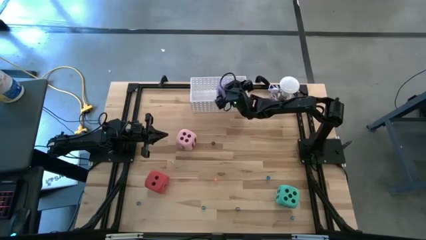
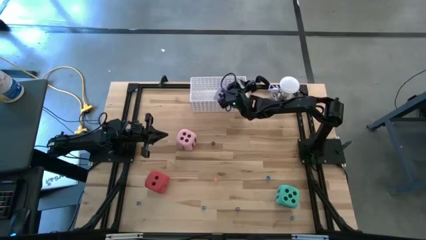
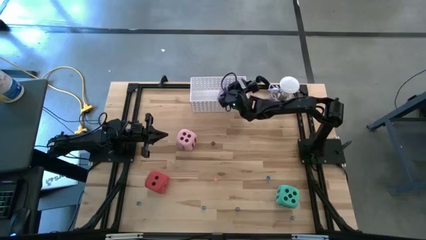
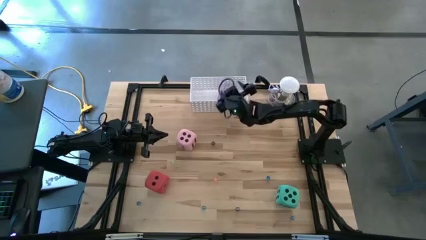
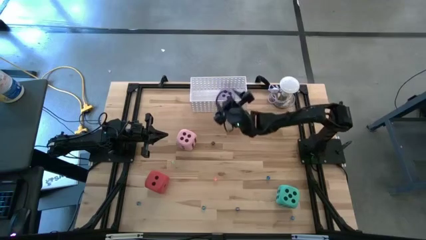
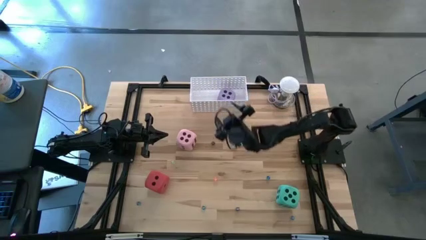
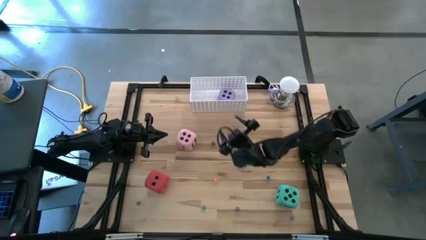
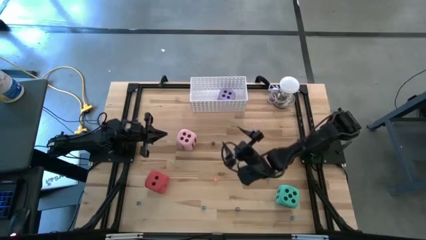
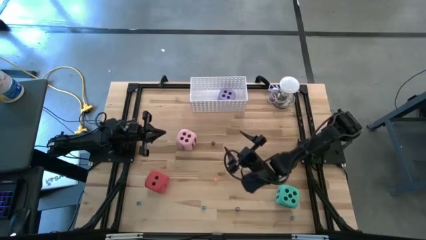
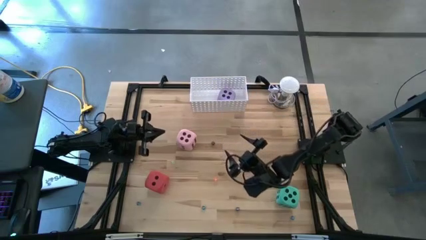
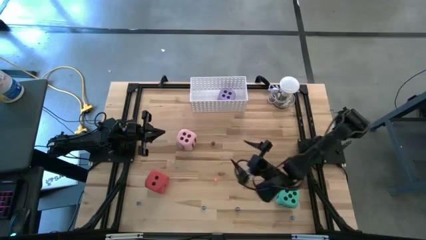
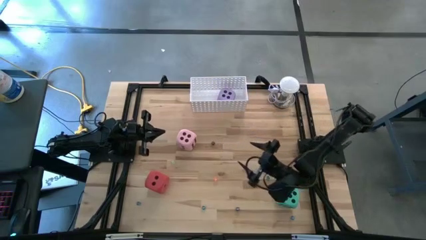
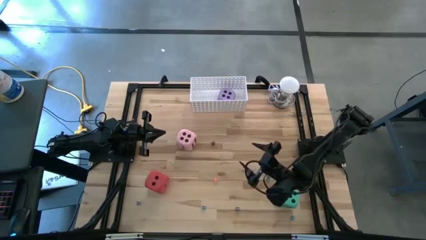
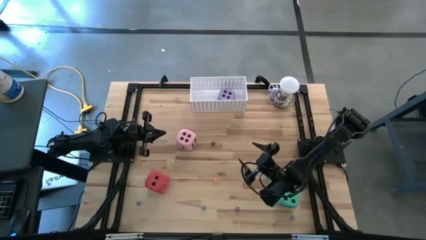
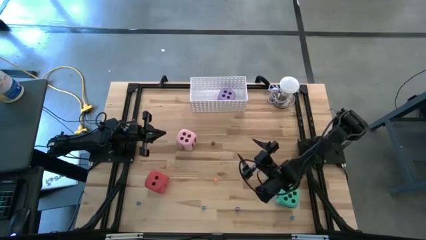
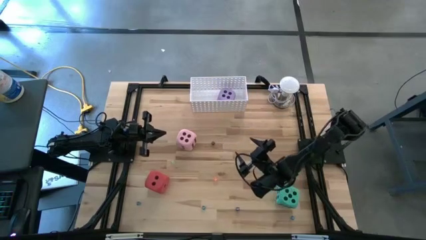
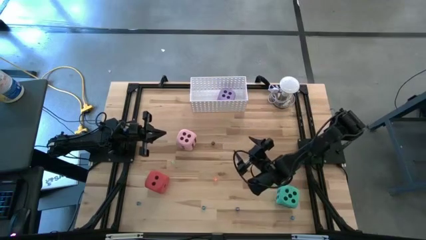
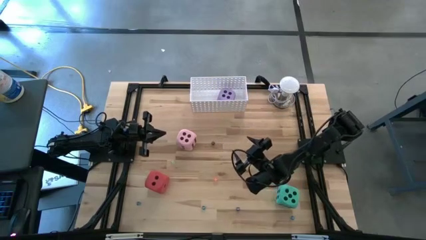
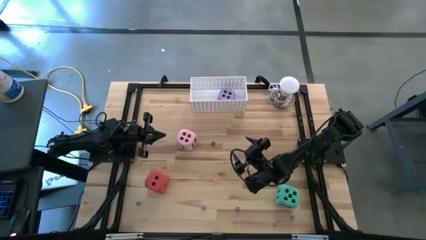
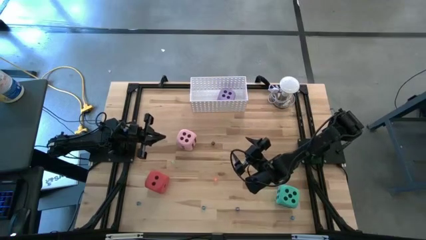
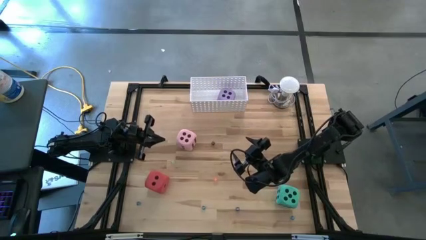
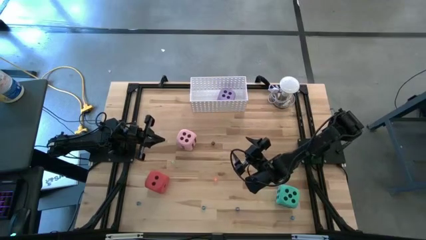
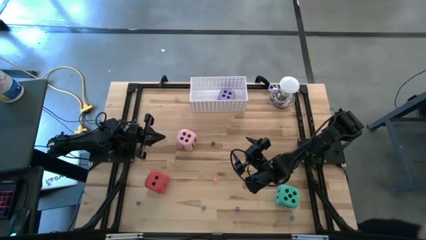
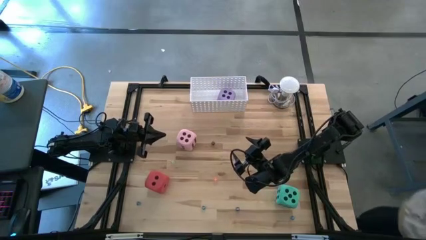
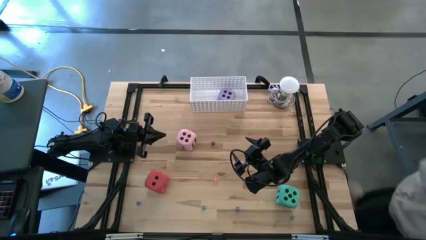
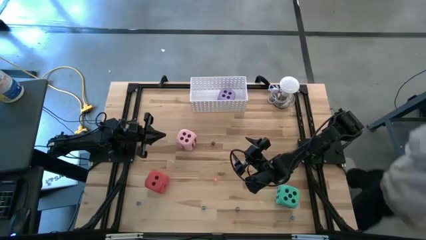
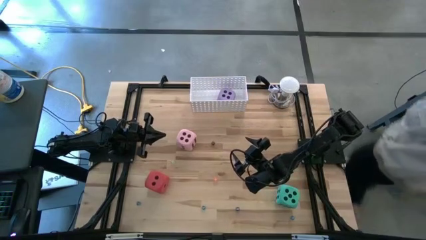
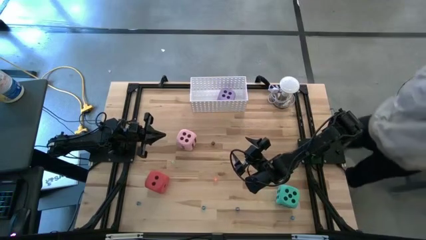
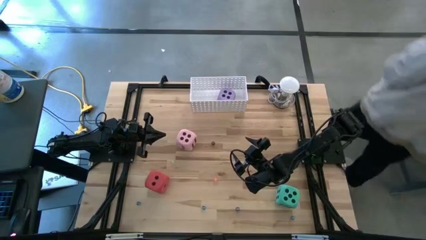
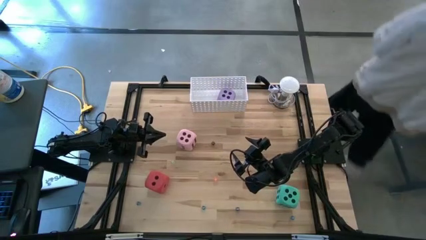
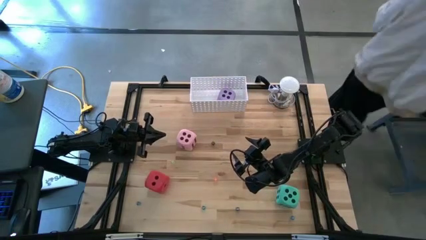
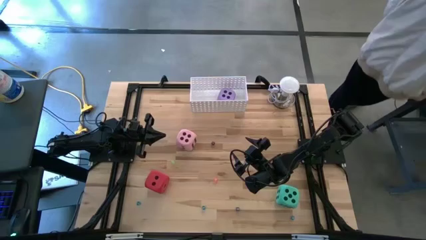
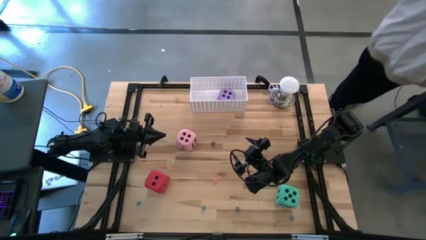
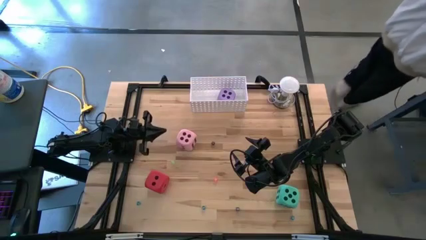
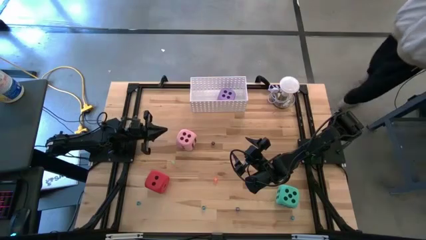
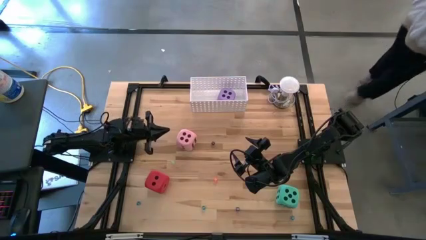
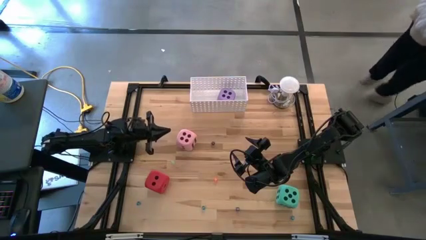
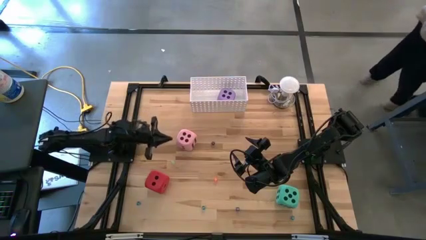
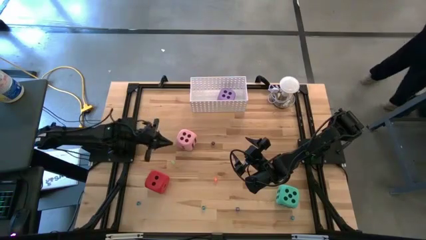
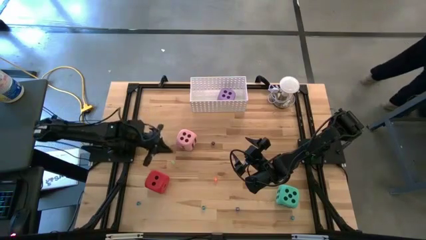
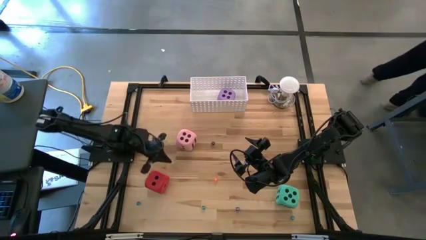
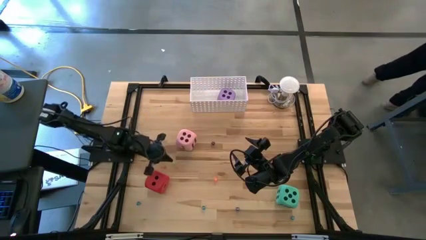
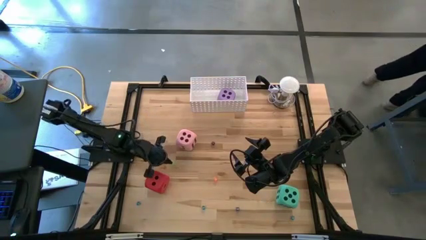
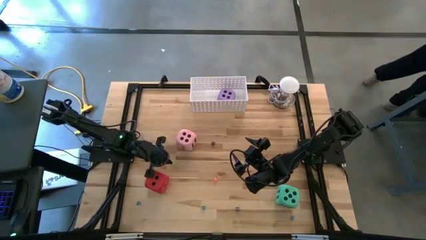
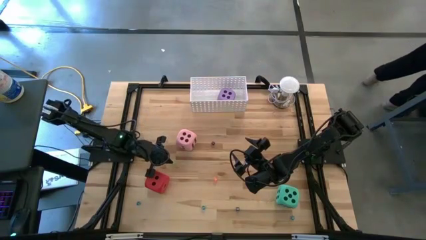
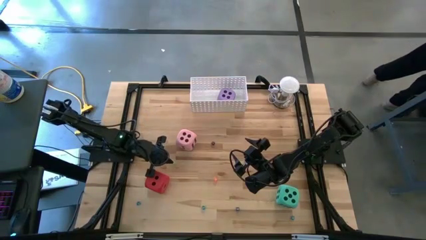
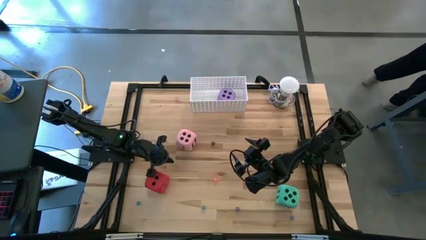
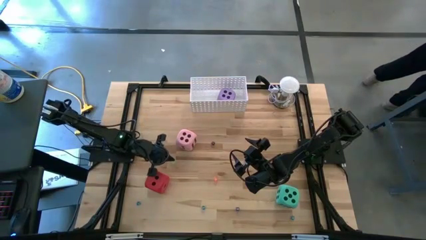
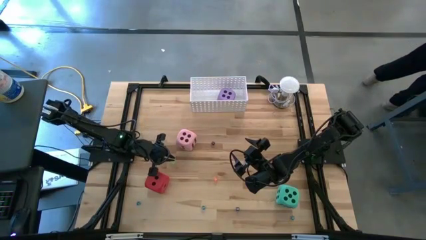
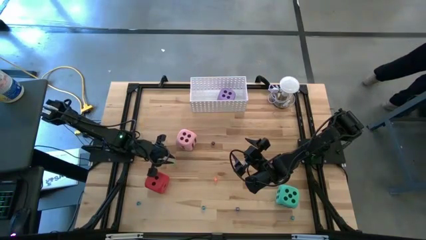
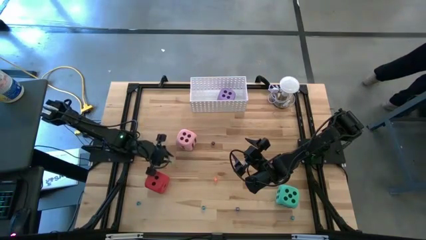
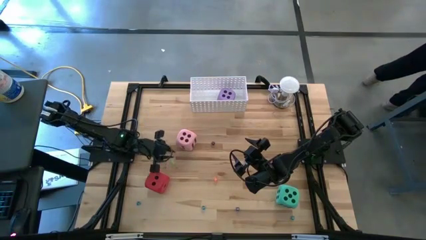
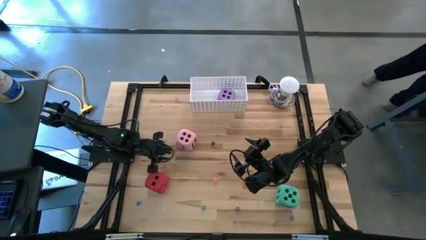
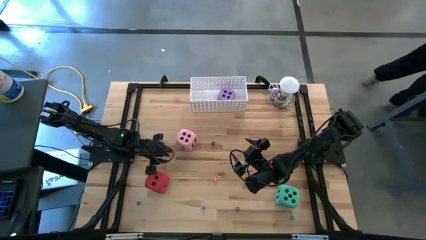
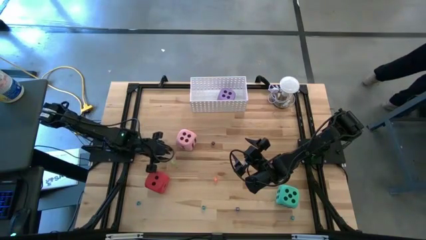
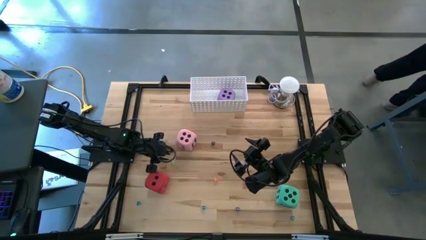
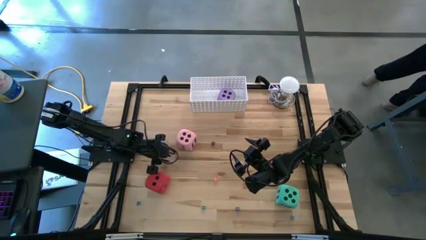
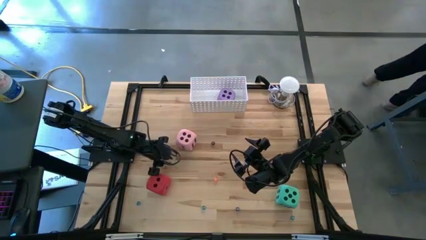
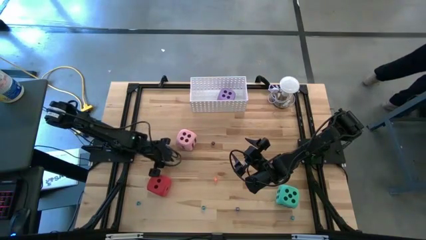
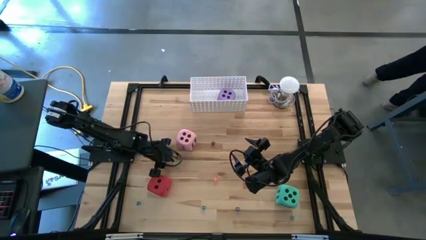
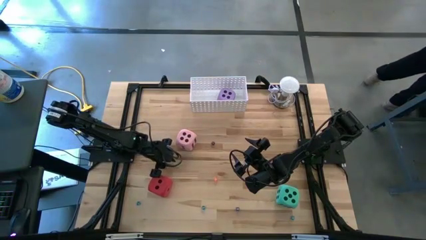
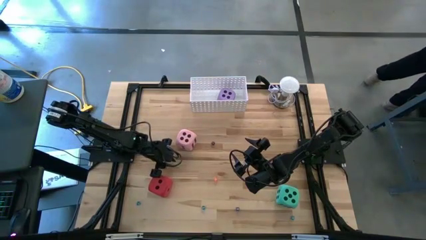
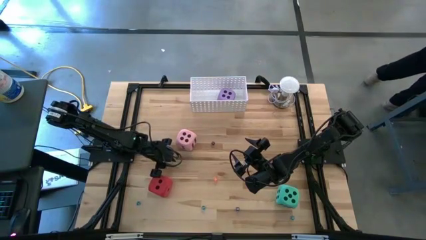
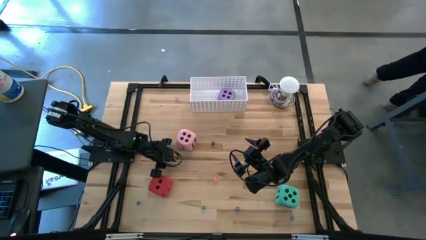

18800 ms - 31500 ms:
Task: Pick & Place Dice
Put the small yellow transparent dice into the white bin
